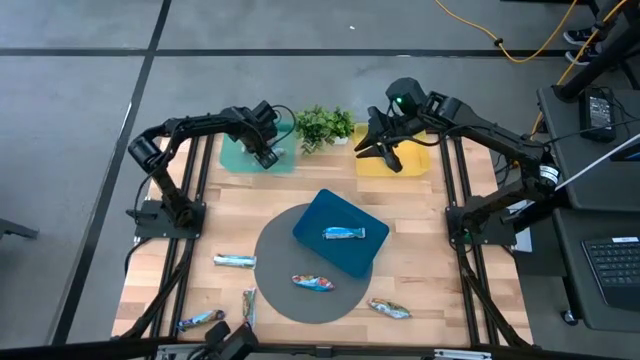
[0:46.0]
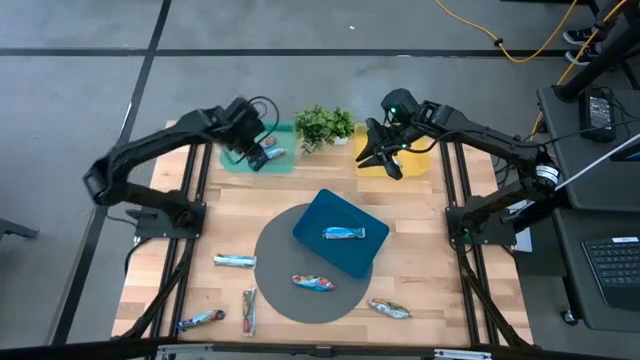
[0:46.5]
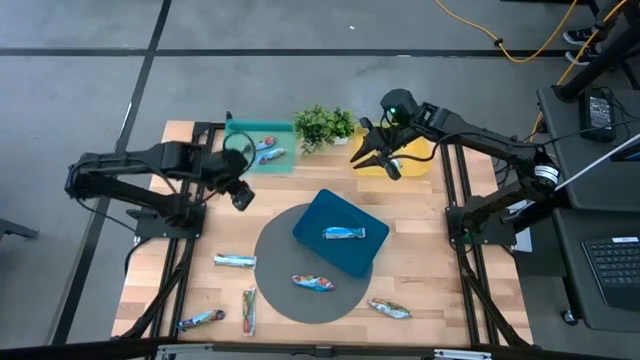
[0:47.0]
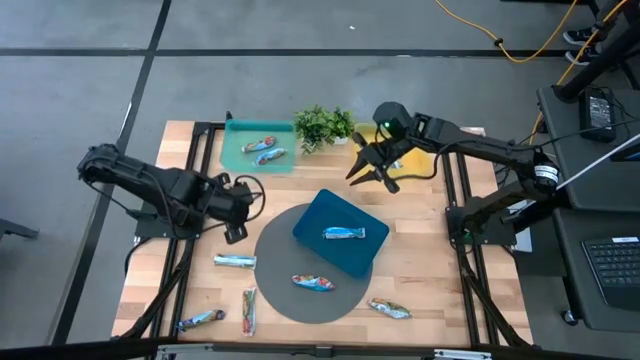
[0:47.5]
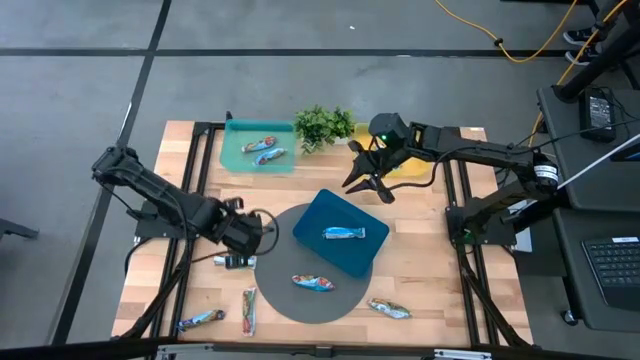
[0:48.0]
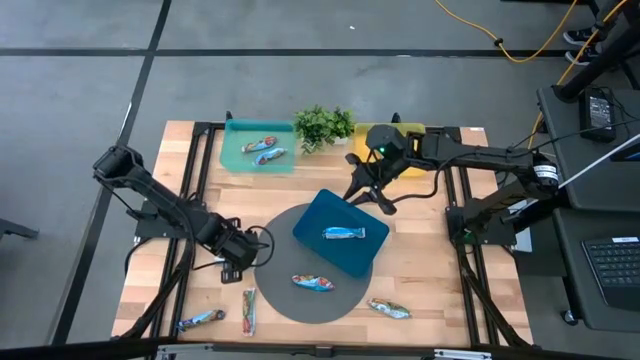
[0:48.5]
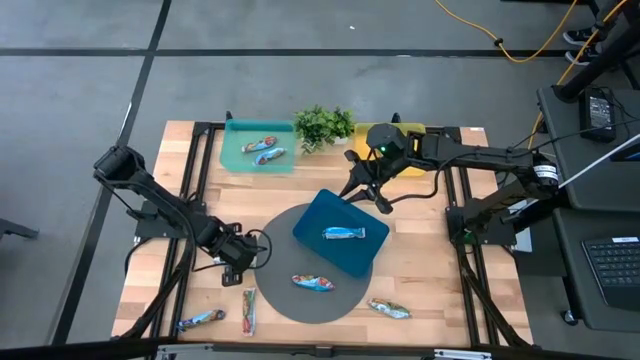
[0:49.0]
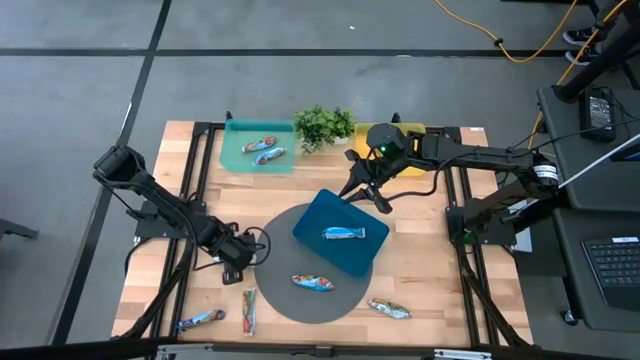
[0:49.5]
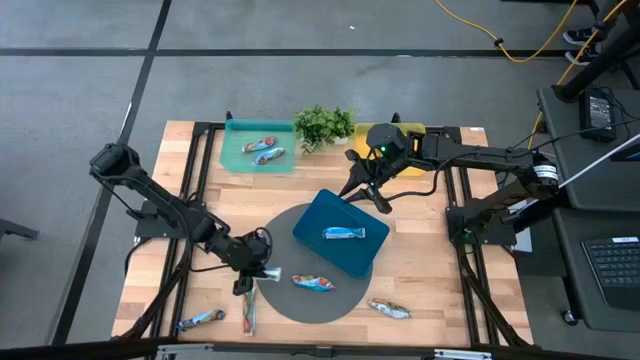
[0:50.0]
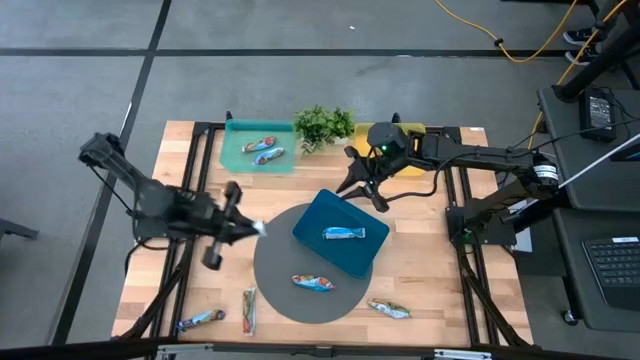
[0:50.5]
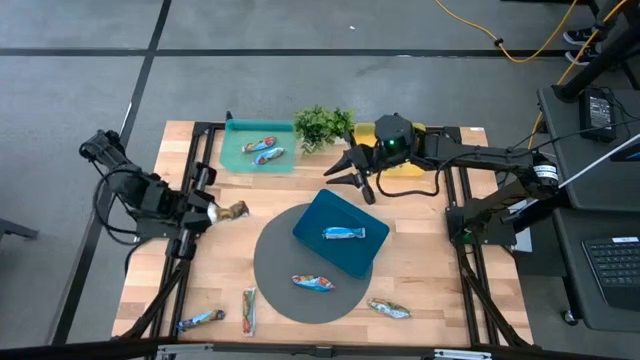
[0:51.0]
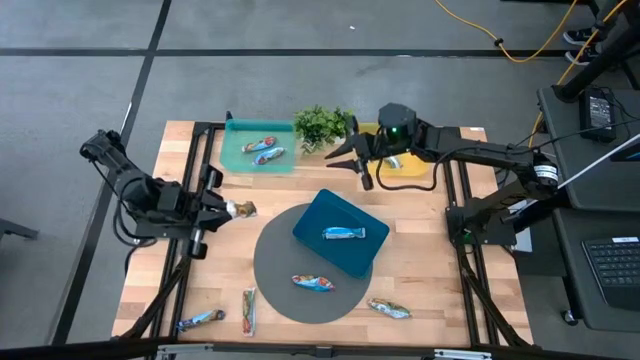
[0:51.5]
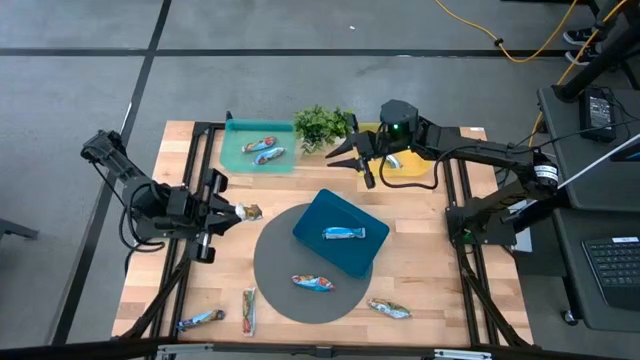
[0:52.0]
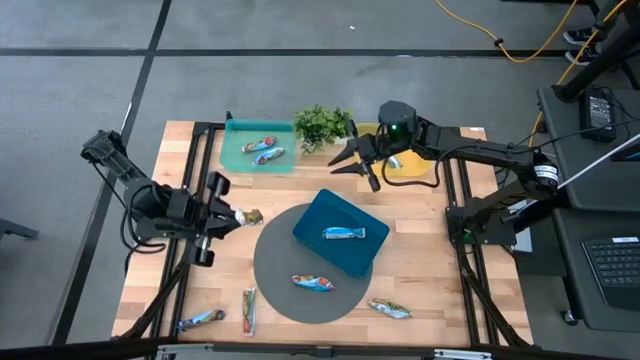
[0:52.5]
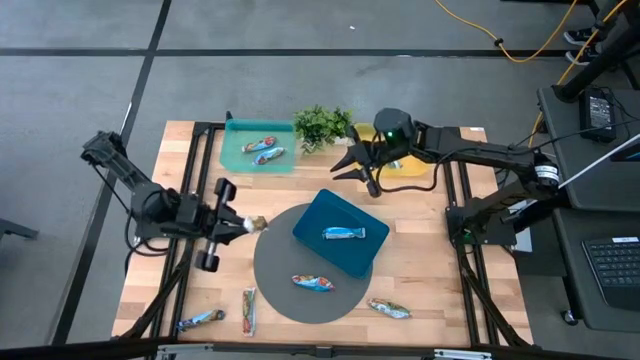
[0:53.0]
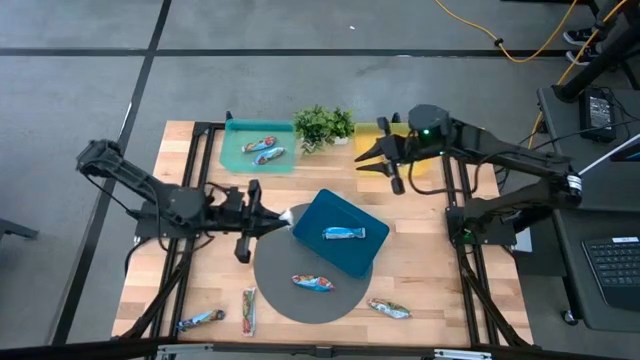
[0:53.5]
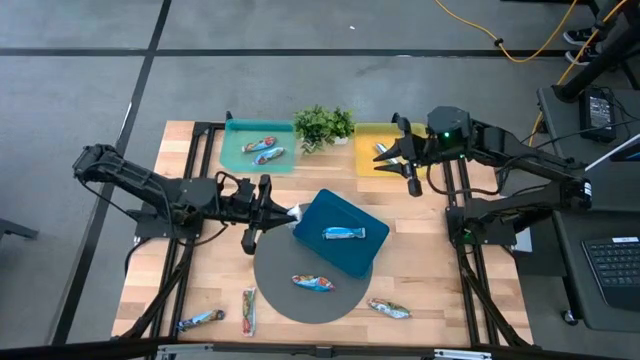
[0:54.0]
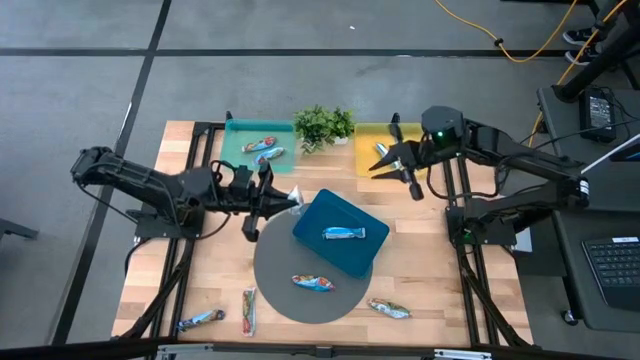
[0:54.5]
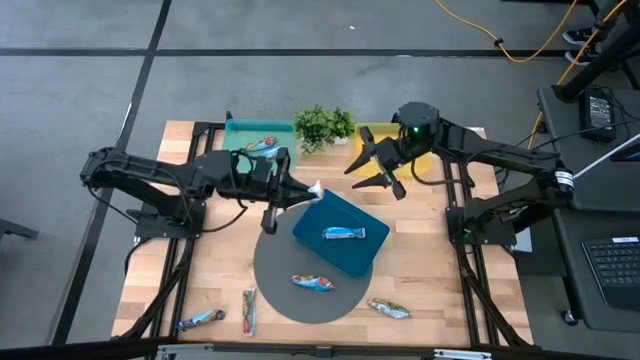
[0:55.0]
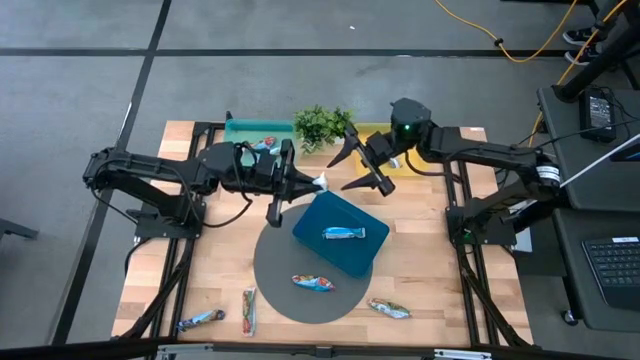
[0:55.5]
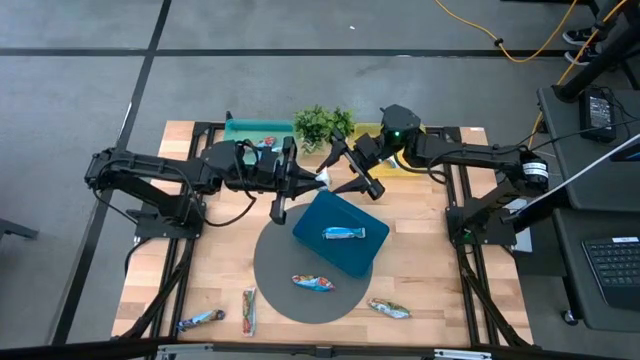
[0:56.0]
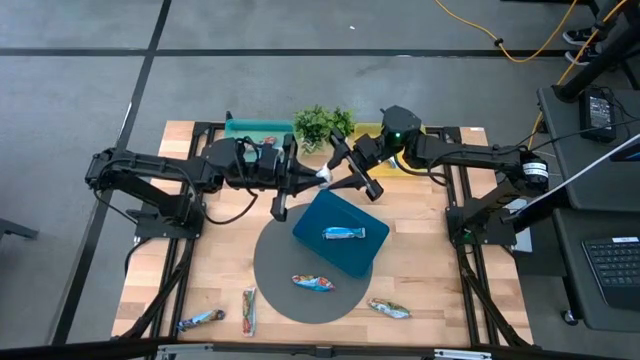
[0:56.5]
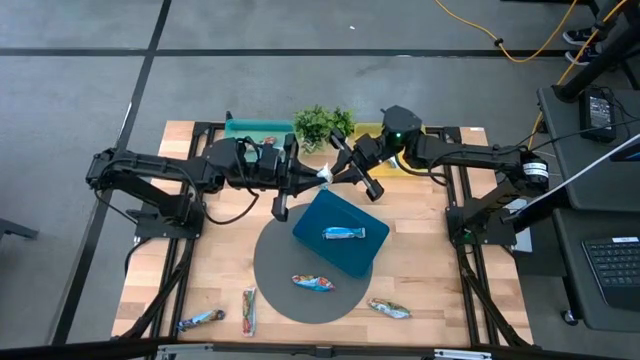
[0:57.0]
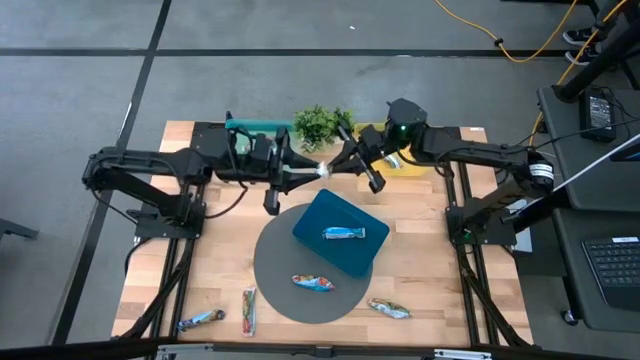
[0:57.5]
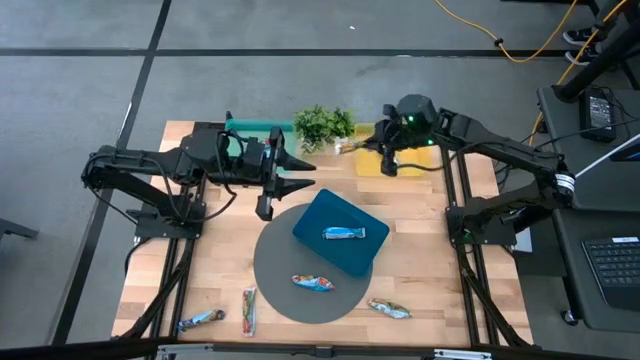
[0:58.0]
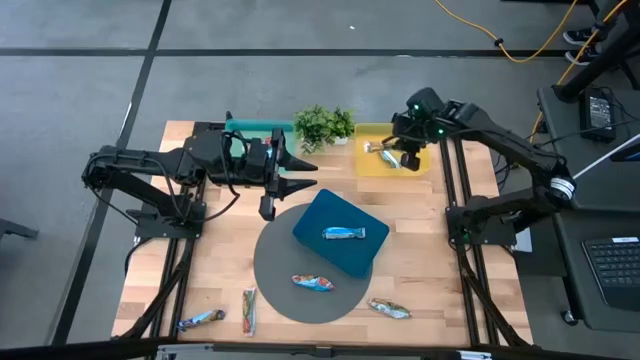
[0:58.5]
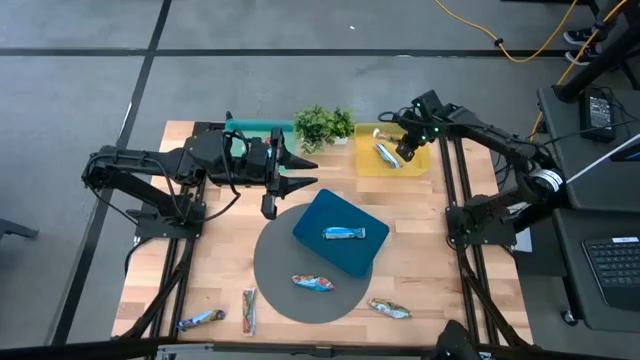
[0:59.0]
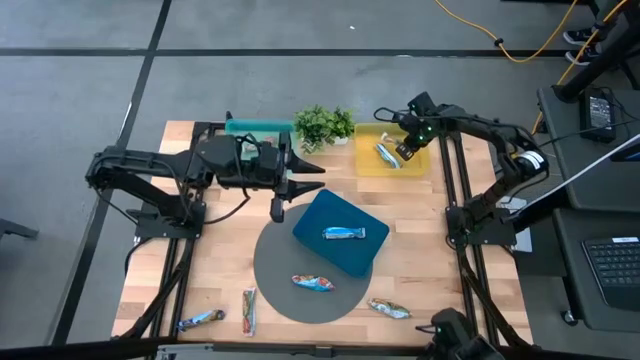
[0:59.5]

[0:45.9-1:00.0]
Task: Pick and place Granola Bars by type
Put the left yellow granola bar into the yellow bin

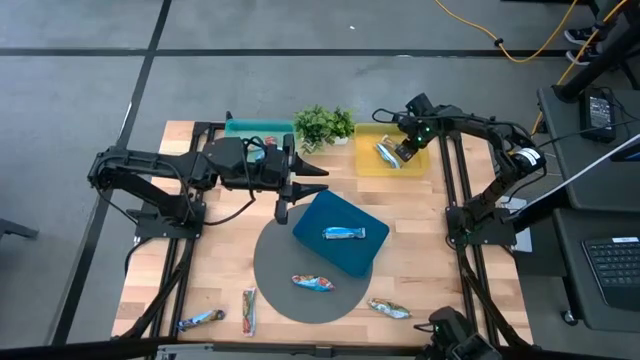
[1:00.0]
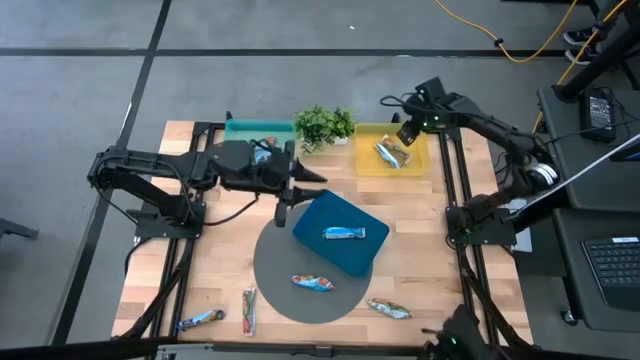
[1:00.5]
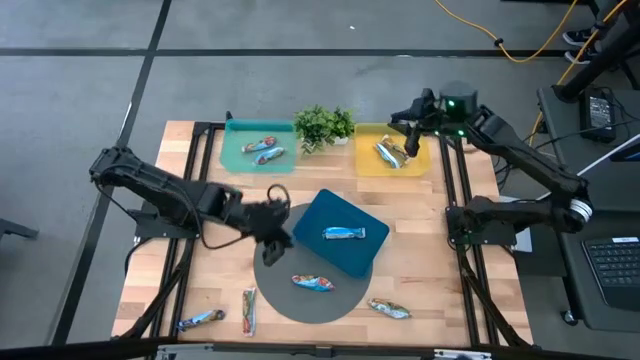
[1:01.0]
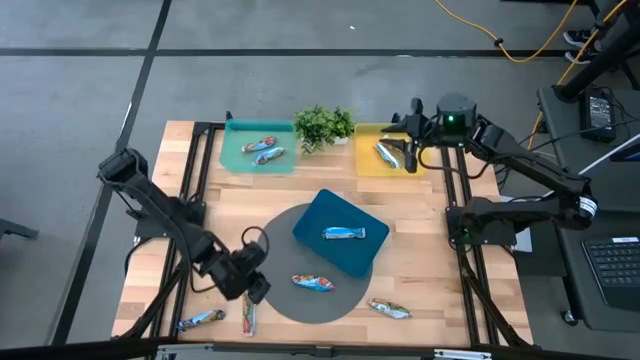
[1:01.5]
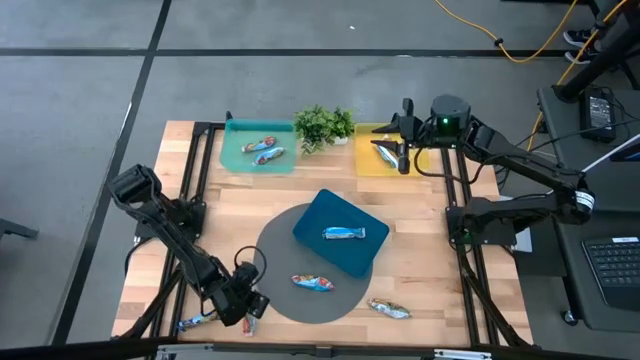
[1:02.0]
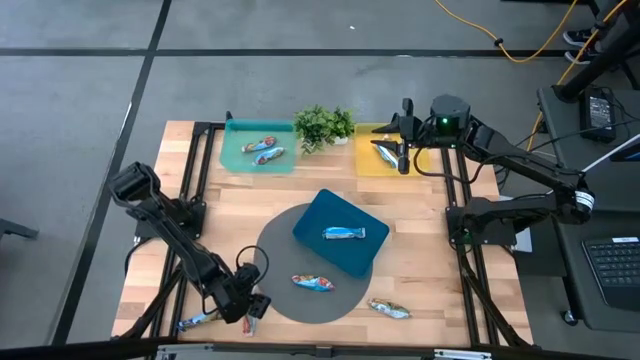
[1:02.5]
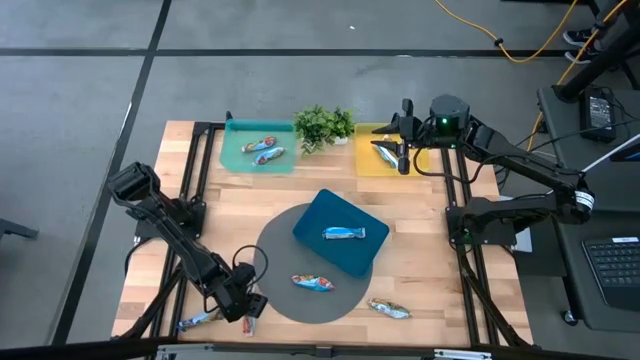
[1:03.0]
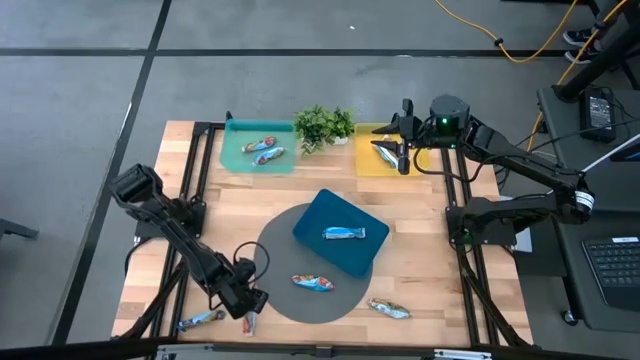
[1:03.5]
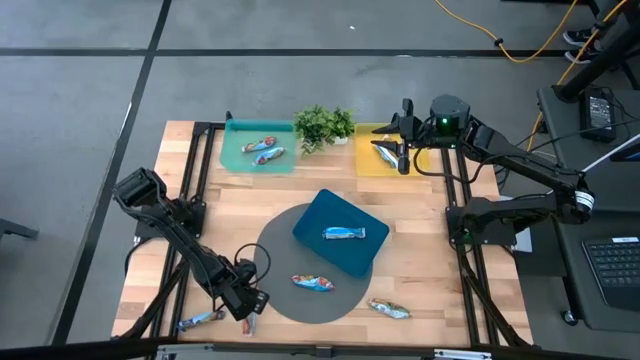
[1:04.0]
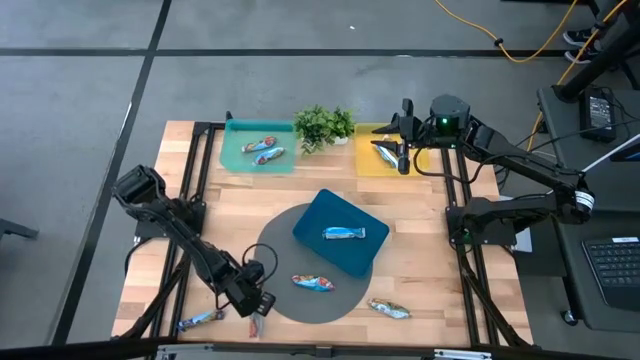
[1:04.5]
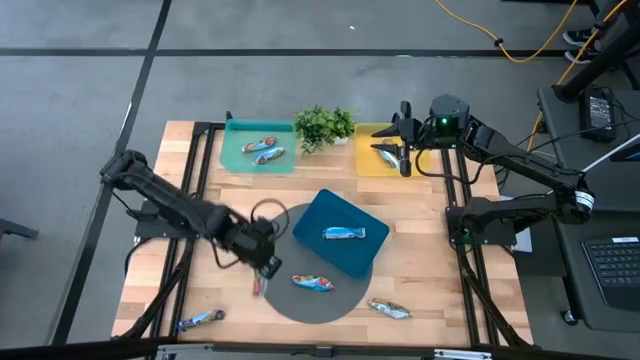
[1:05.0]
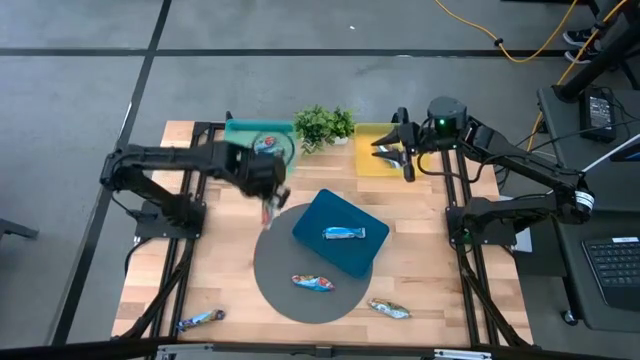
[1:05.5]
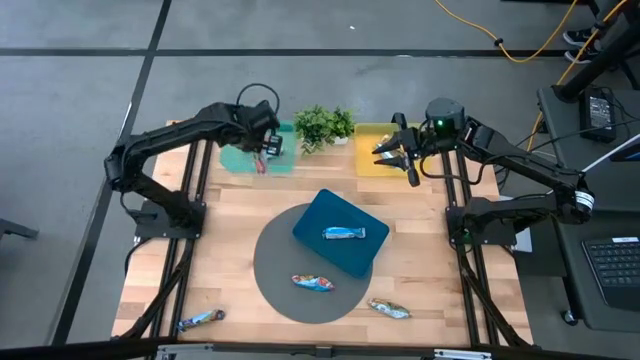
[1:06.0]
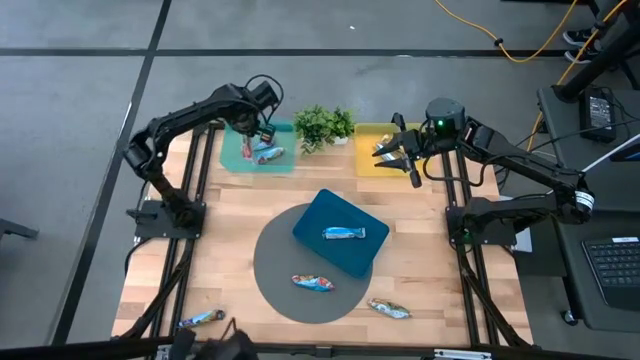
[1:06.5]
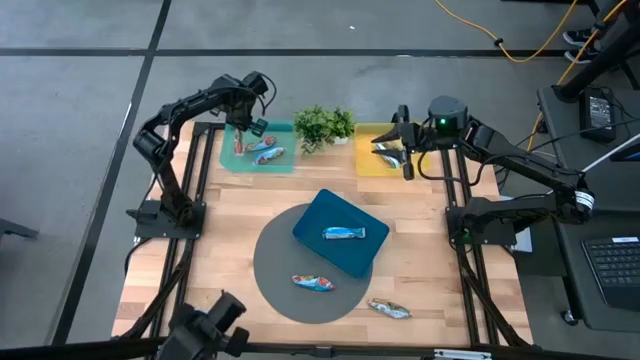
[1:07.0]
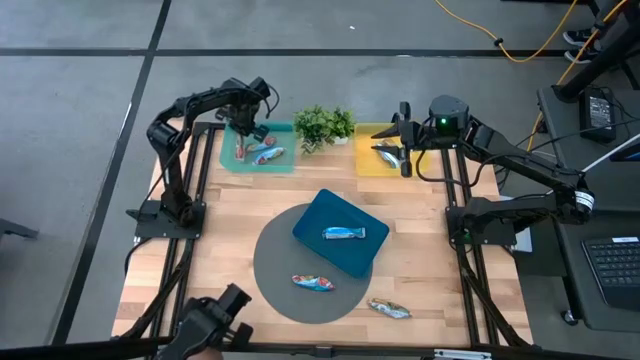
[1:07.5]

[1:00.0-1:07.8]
Put the left red granola bar into the green bin
